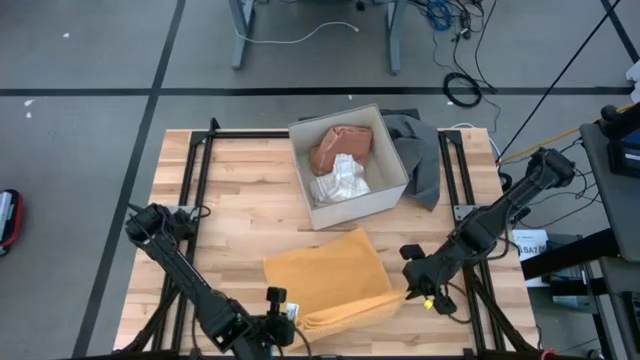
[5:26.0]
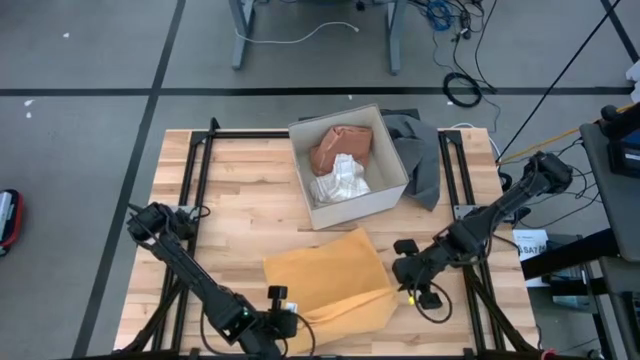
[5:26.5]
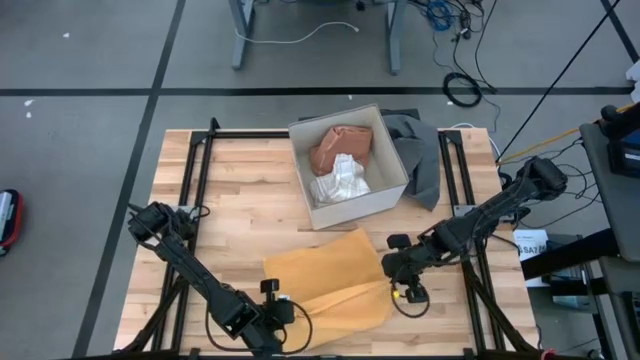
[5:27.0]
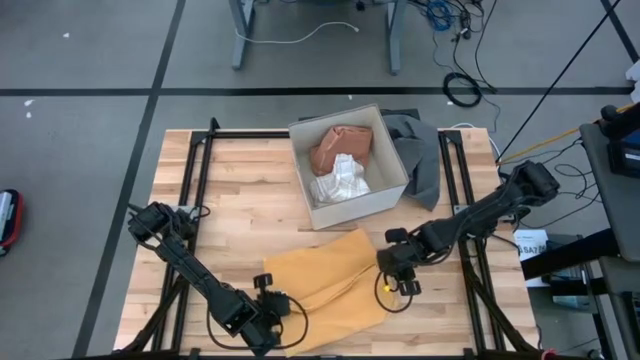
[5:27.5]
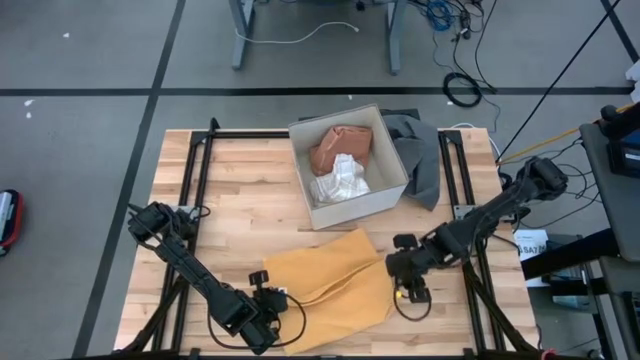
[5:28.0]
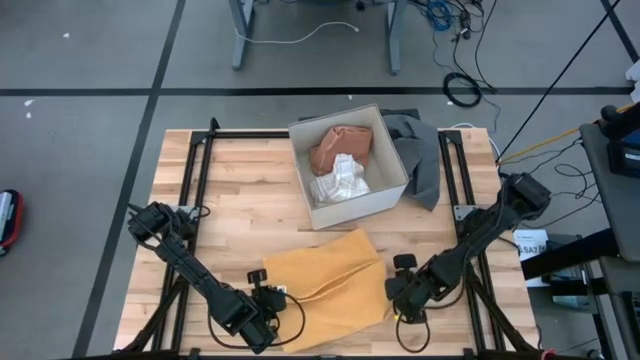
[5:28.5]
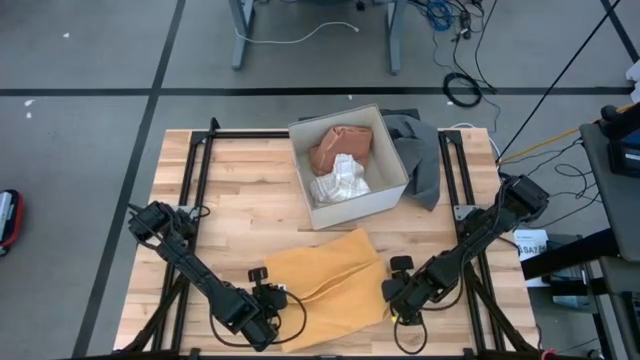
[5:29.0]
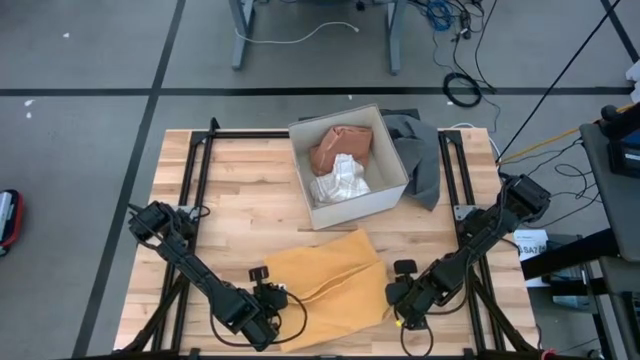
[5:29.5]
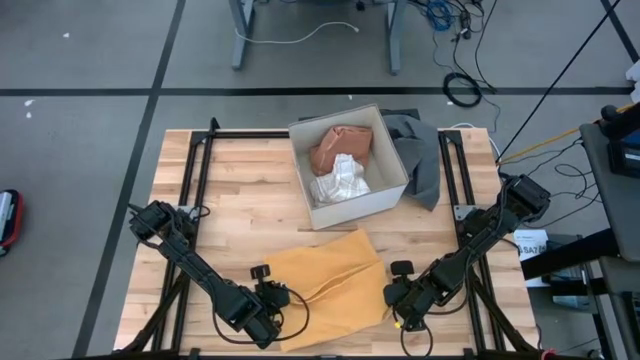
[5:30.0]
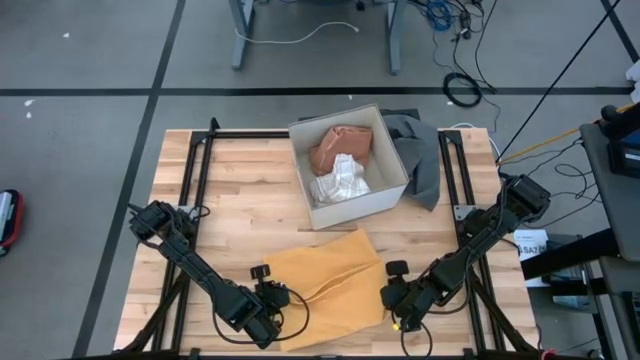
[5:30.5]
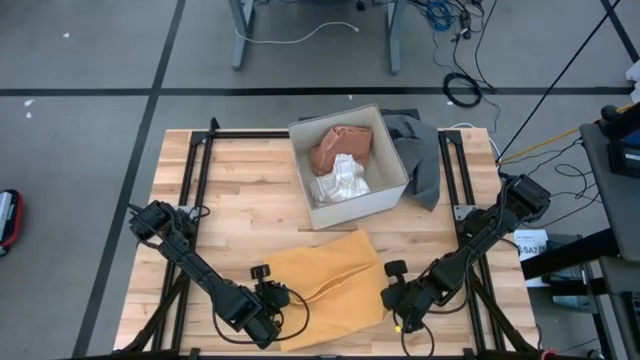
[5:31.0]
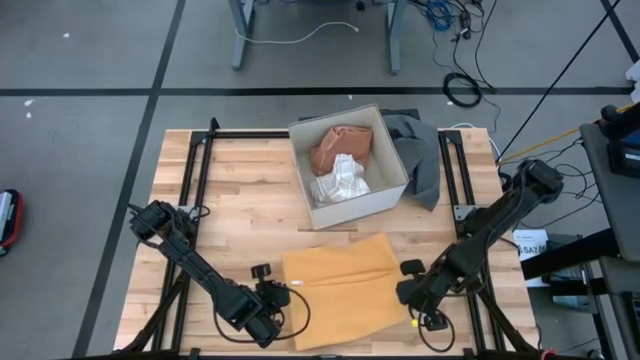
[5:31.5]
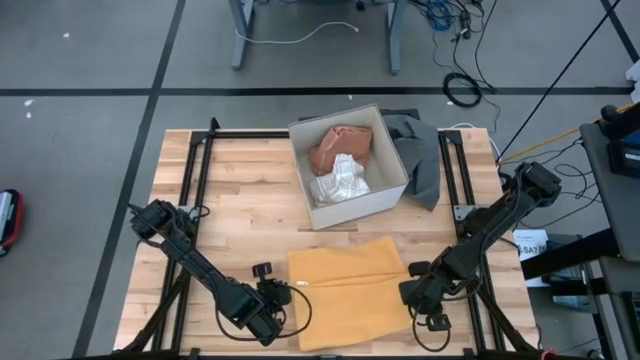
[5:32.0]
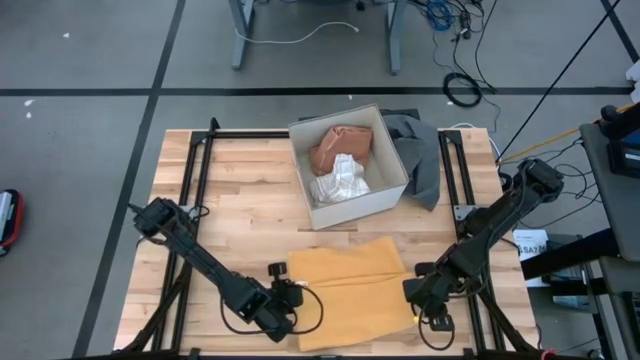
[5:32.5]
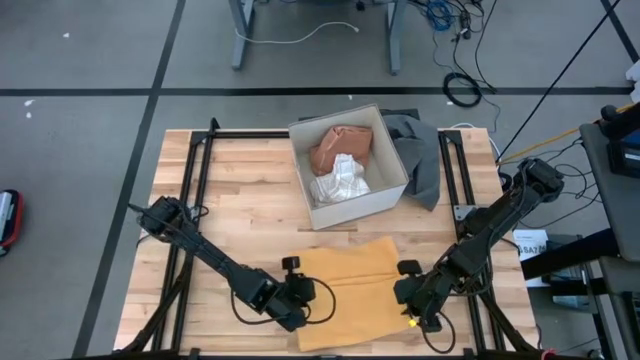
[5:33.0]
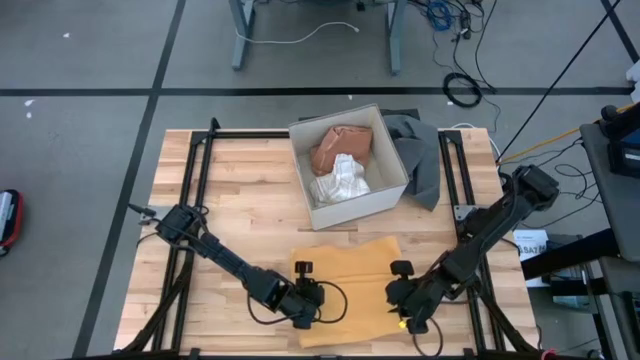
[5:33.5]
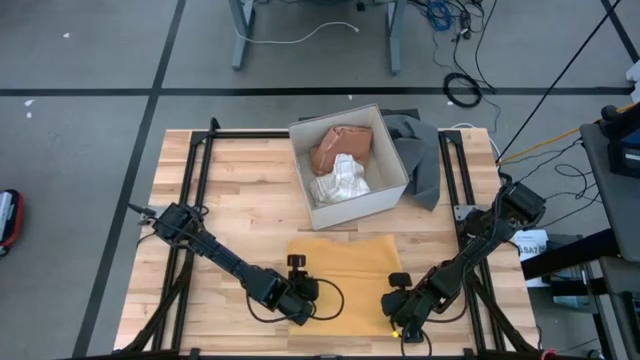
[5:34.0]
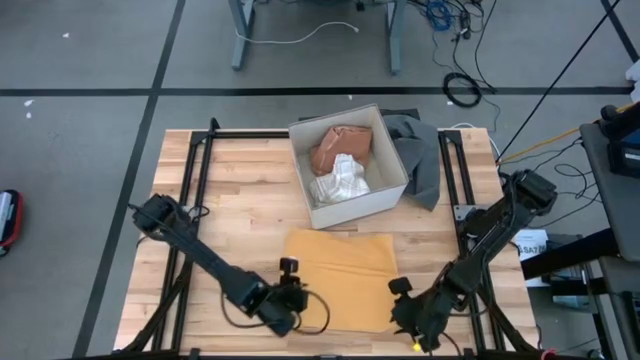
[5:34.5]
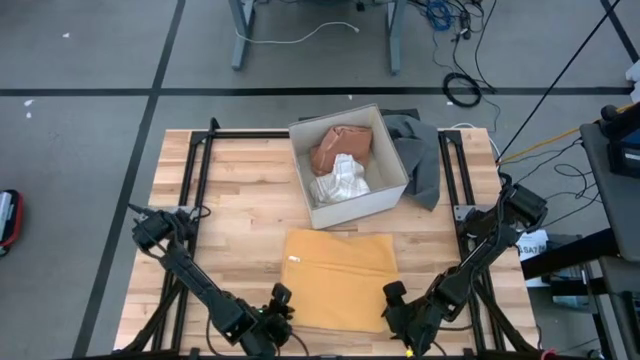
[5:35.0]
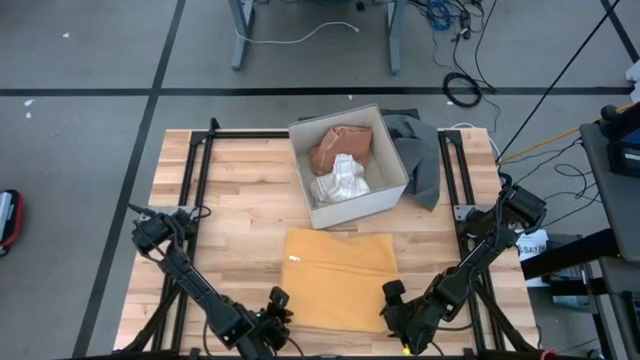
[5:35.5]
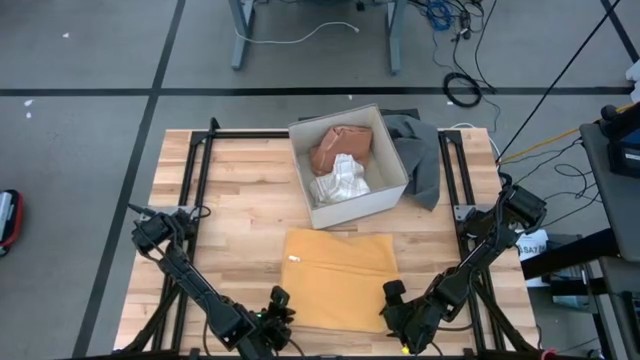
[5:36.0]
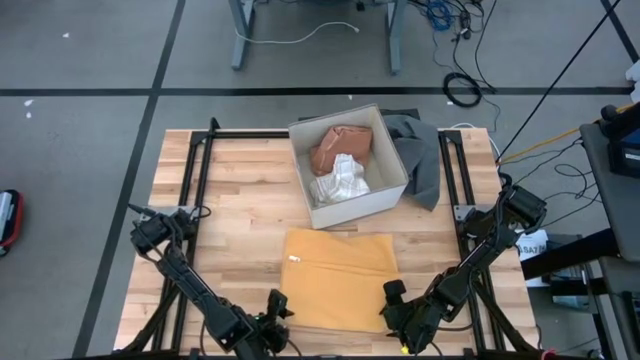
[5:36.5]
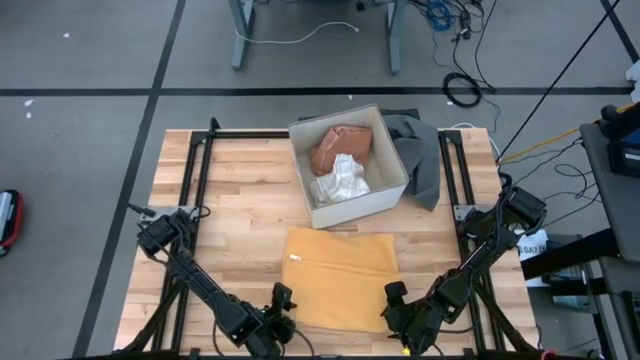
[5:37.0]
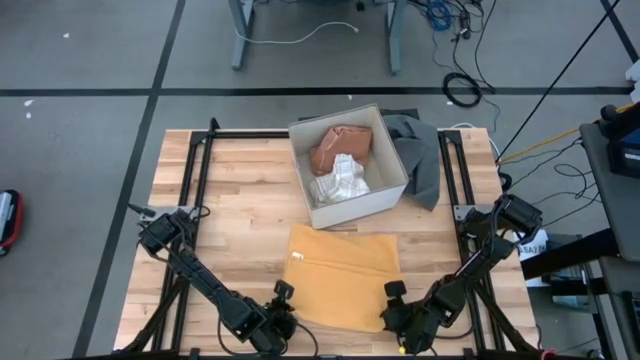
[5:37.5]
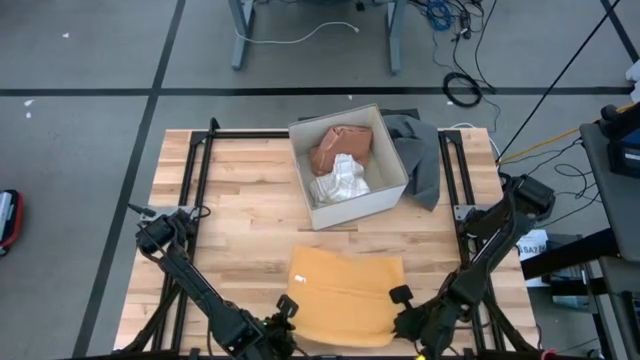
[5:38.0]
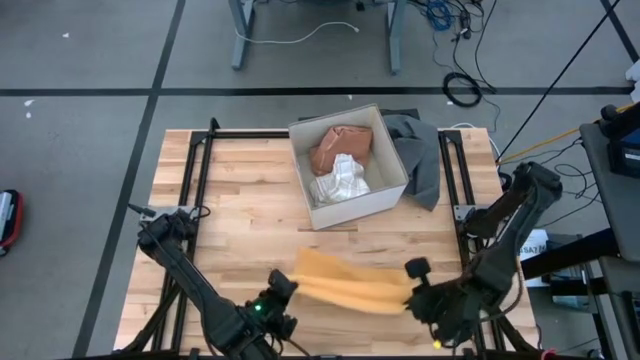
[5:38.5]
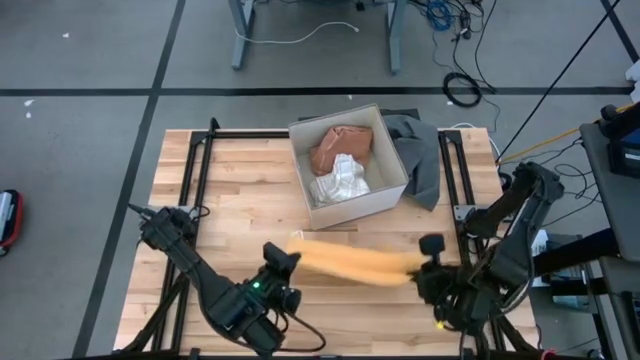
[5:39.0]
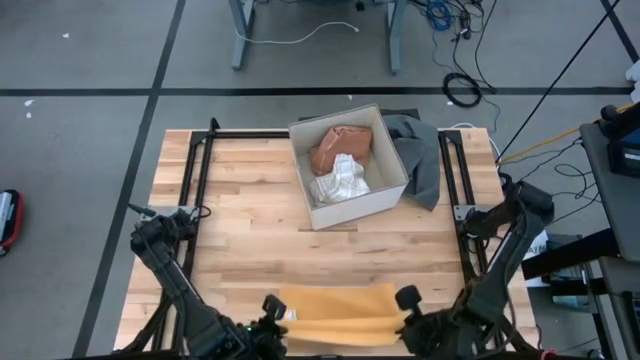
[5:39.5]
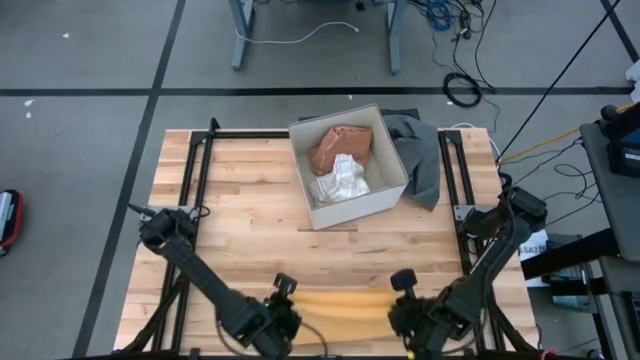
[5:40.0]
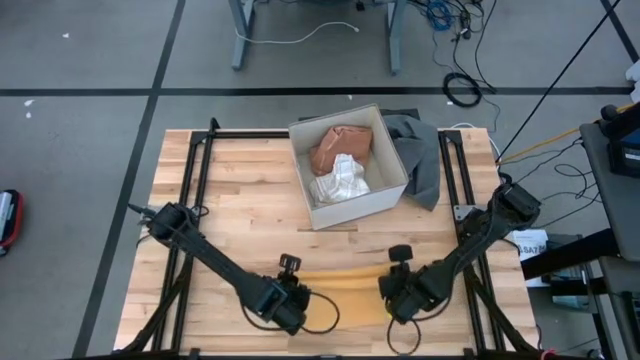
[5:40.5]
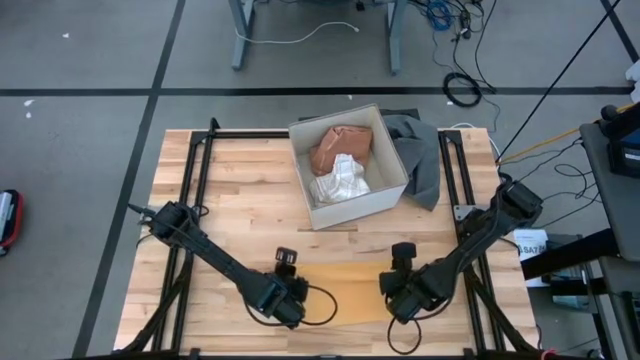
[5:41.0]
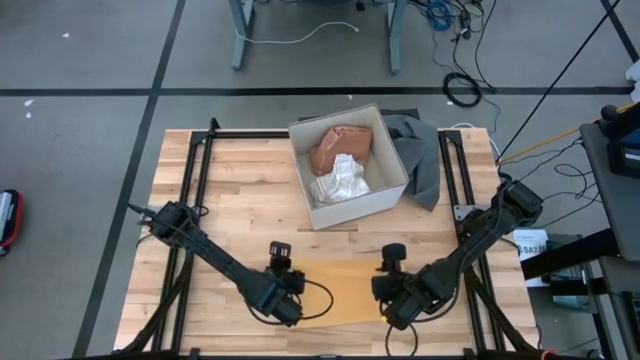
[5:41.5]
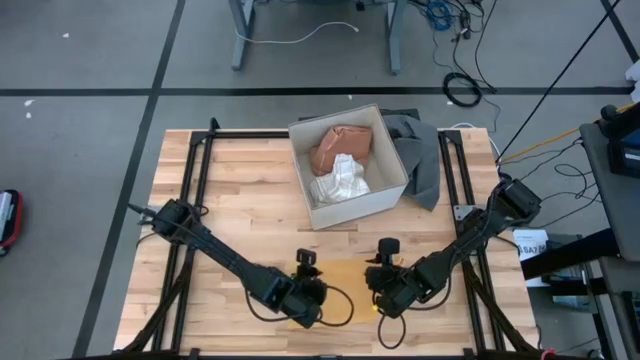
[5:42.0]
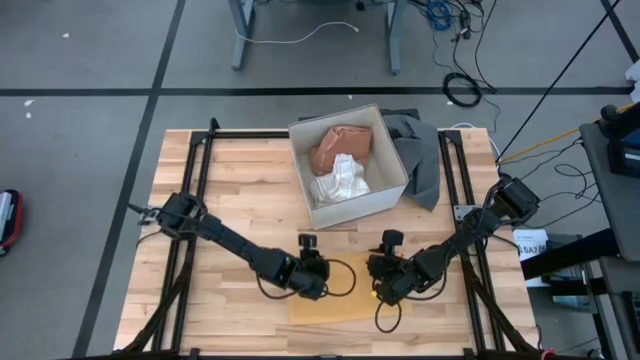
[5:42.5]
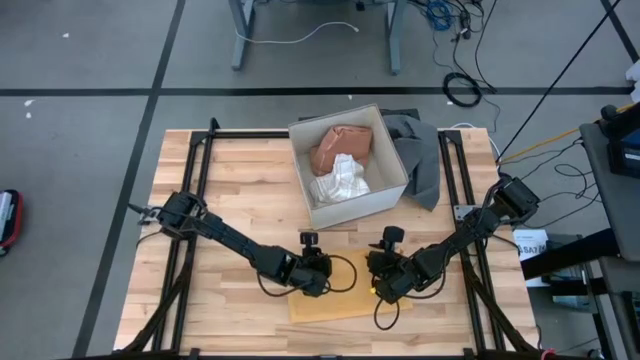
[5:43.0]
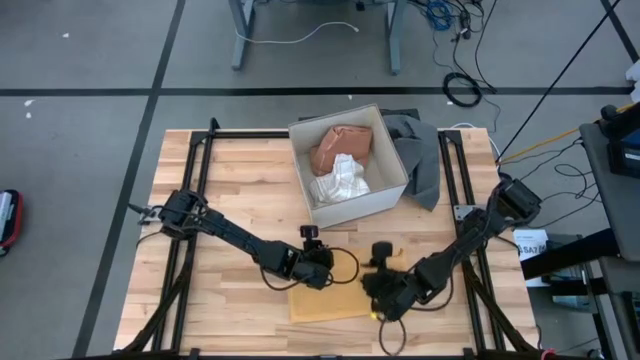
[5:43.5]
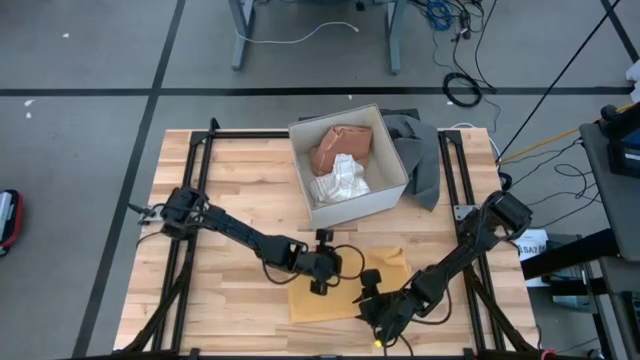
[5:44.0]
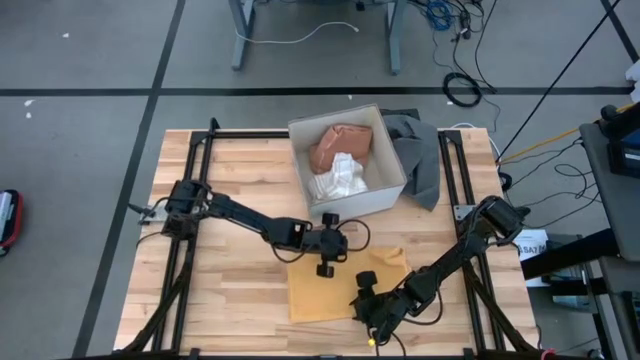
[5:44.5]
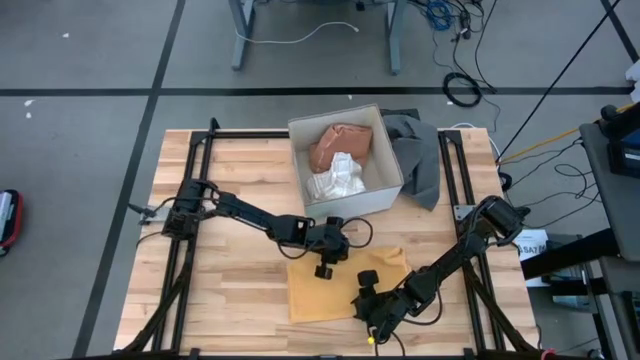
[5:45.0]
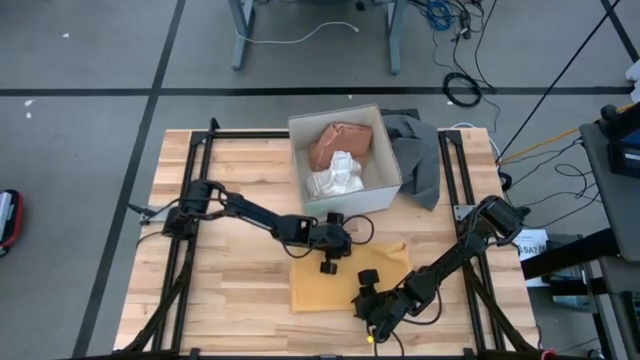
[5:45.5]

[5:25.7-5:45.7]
Task: Fold towel
Fold the orange towel
